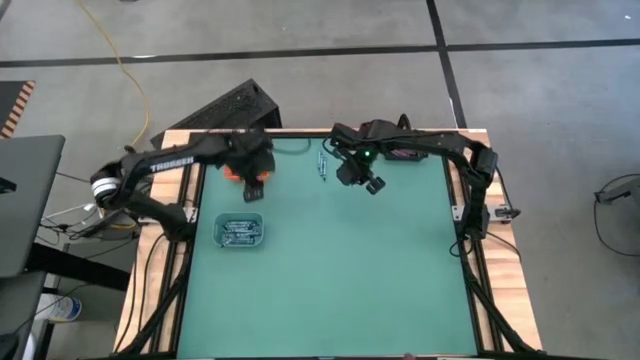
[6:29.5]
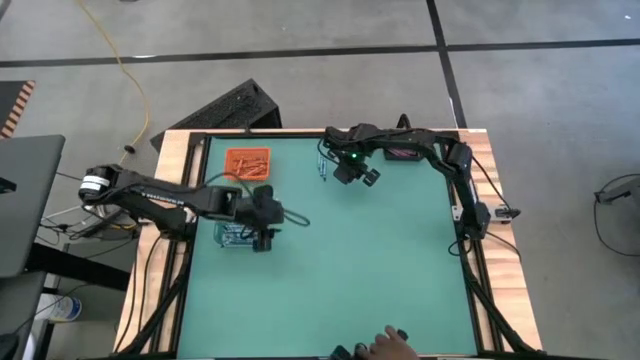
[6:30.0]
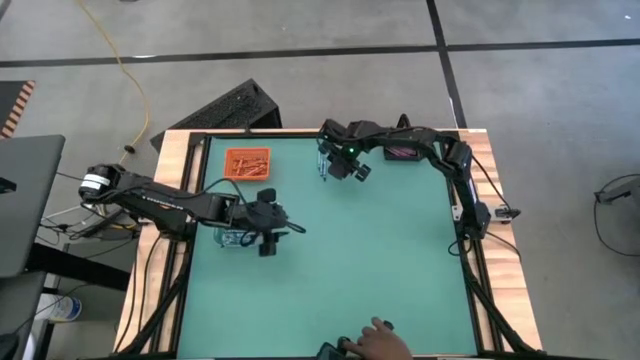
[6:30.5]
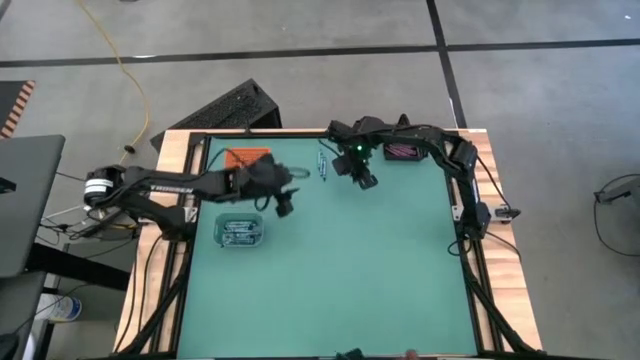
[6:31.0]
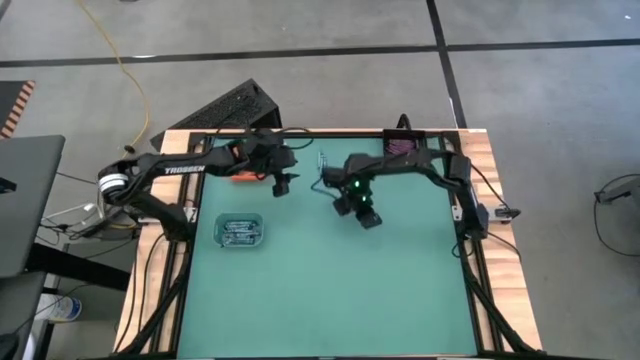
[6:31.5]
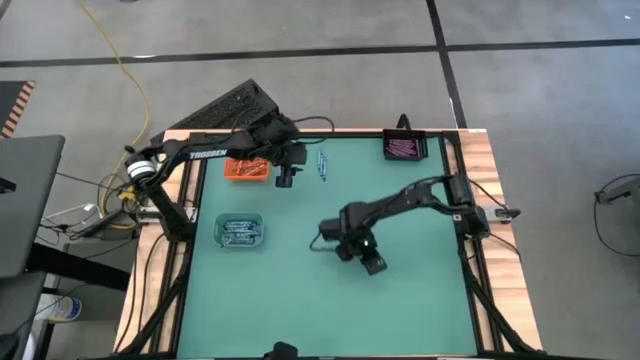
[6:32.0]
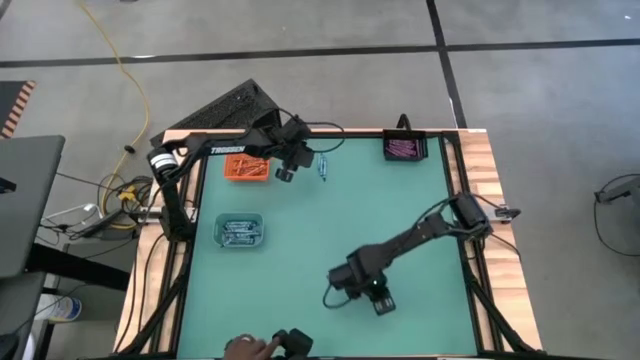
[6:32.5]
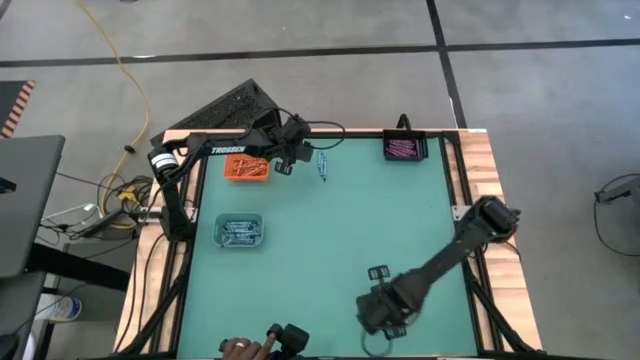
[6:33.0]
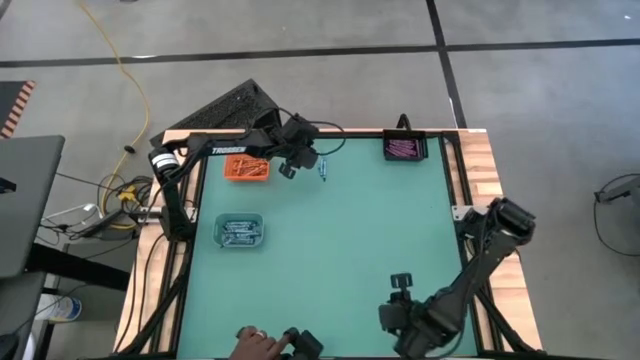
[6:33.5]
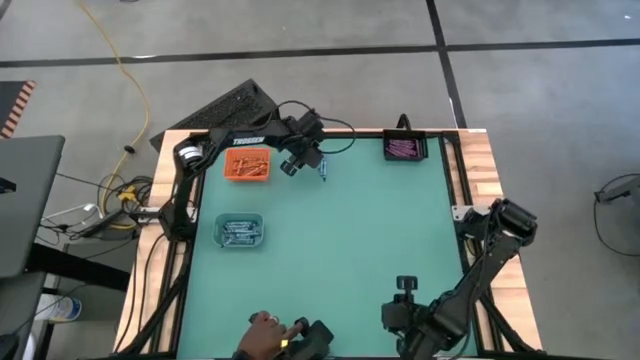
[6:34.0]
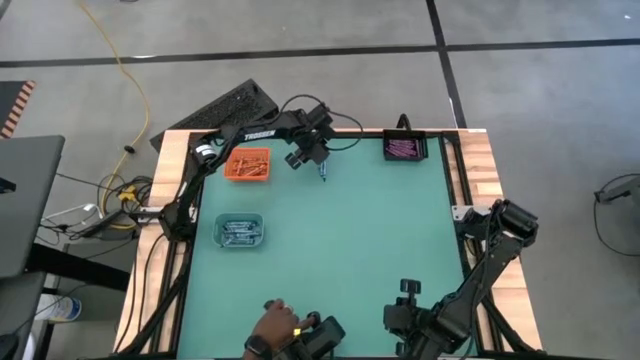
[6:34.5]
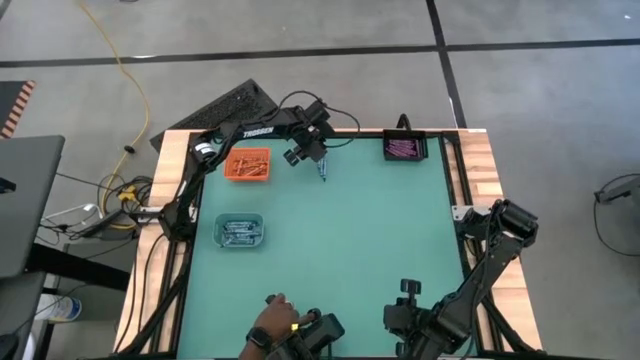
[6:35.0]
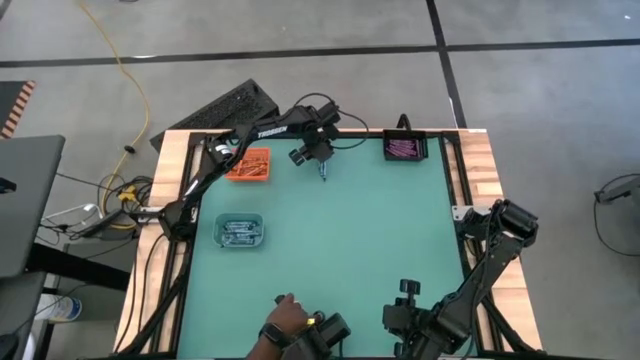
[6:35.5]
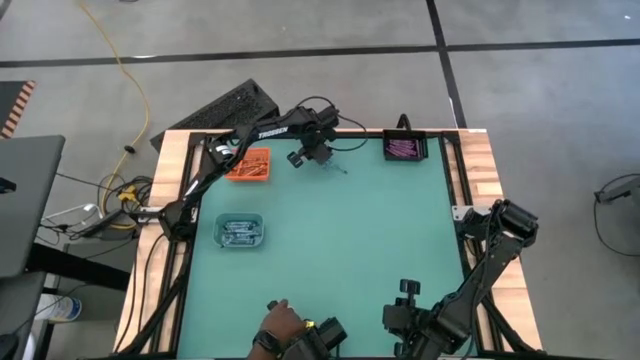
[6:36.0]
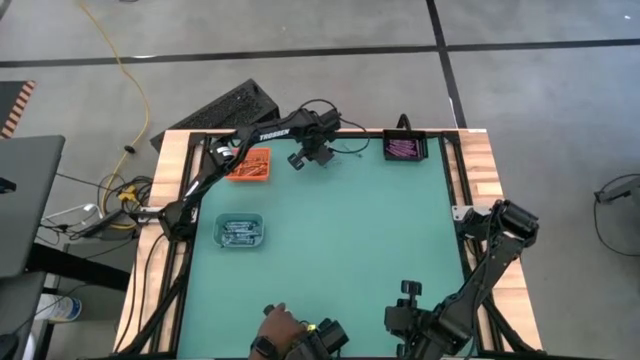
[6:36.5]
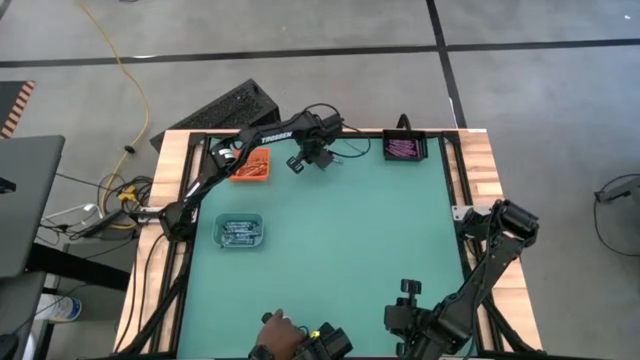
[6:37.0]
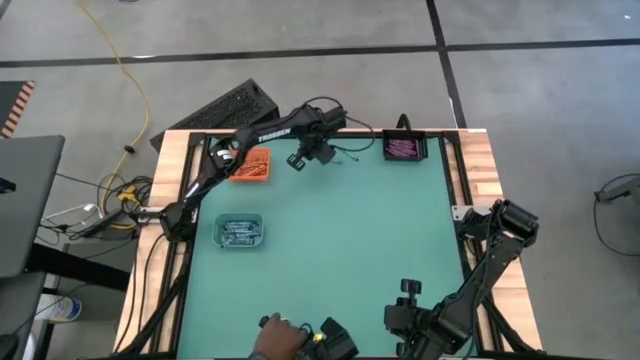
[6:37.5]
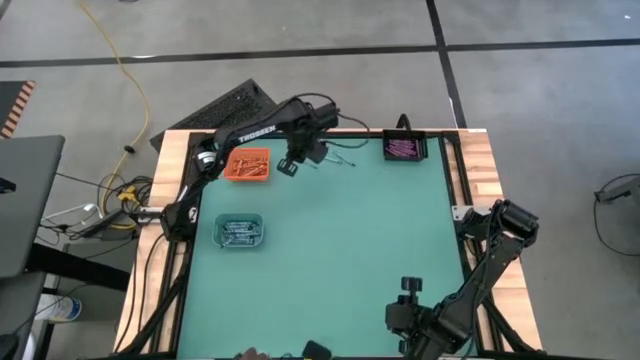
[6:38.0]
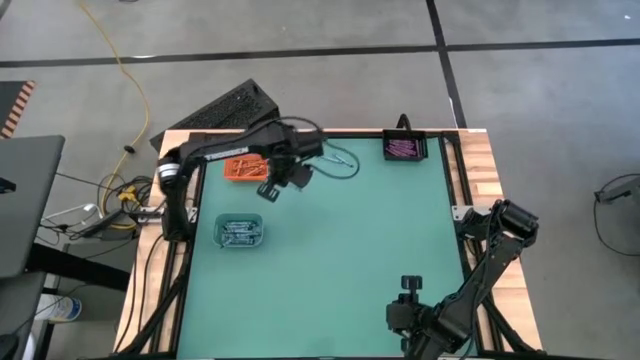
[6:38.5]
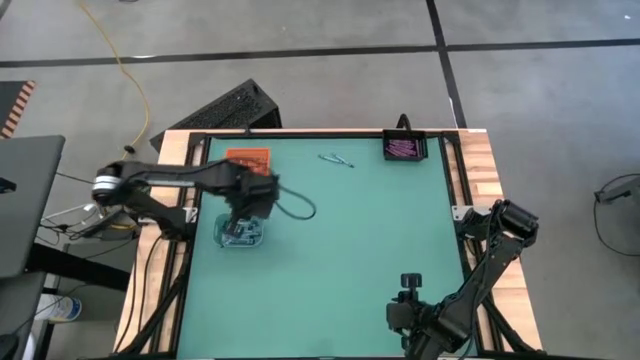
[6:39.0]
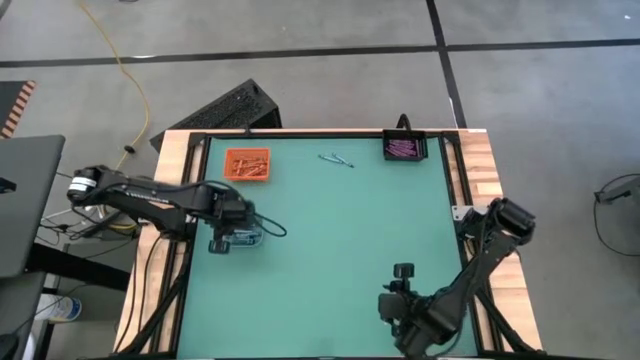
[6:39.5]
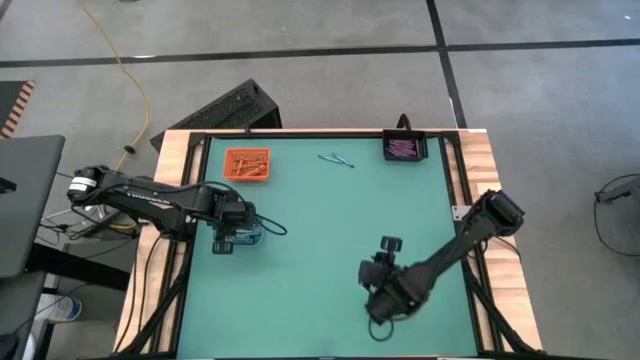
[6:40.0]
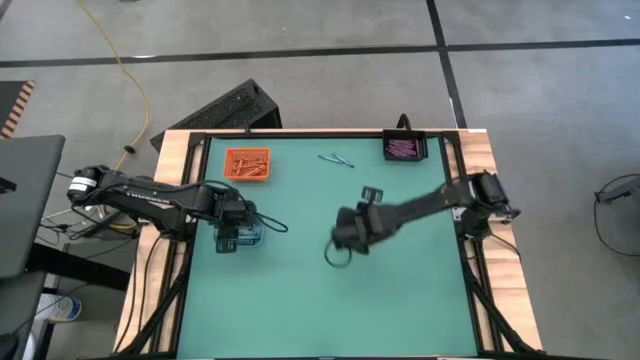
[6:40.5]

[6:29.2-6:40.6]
Task: Sort crayons
Put the blue crayon into the blue bin

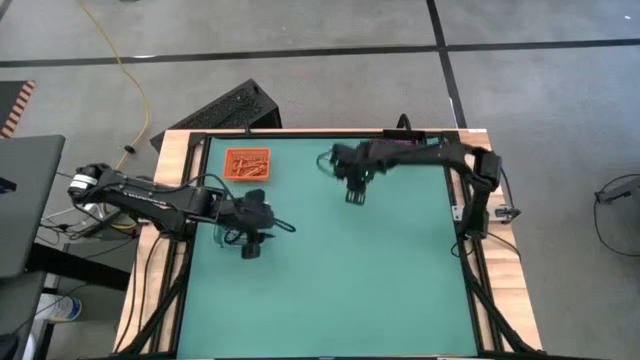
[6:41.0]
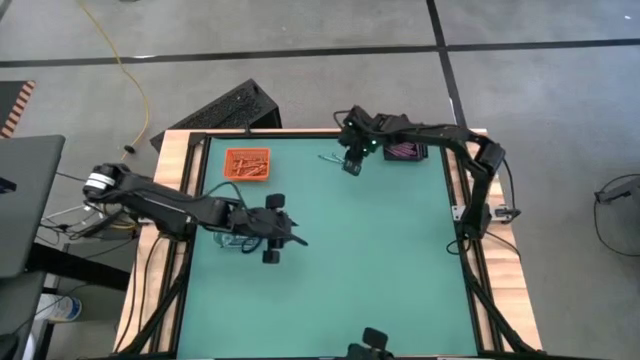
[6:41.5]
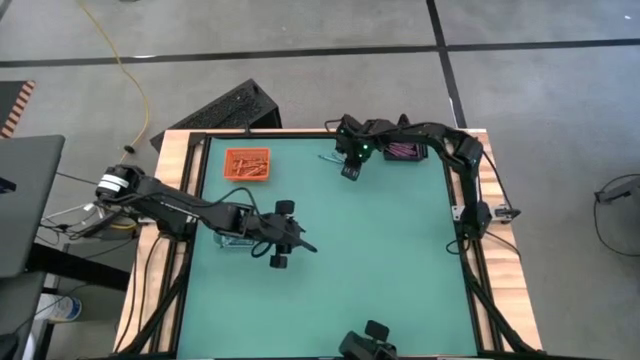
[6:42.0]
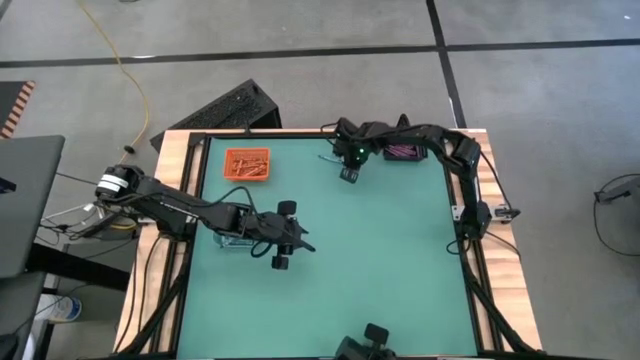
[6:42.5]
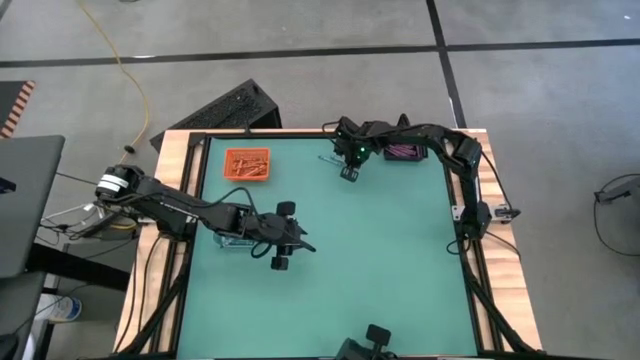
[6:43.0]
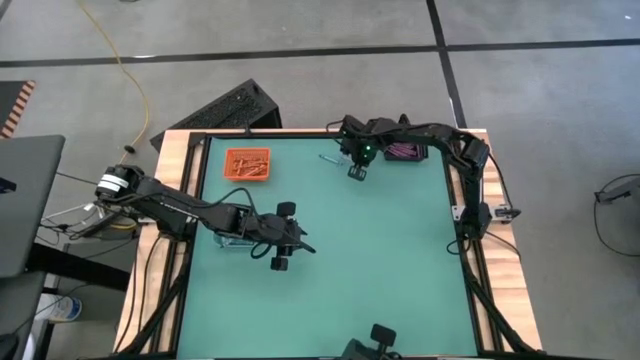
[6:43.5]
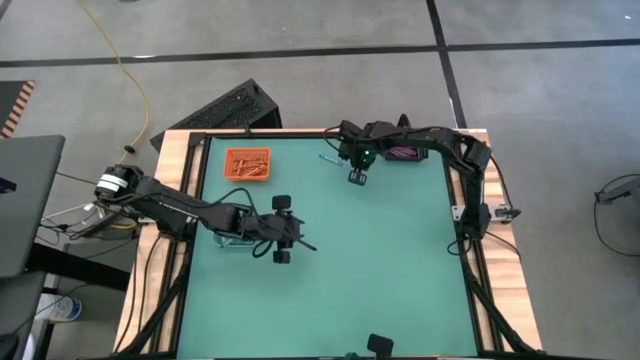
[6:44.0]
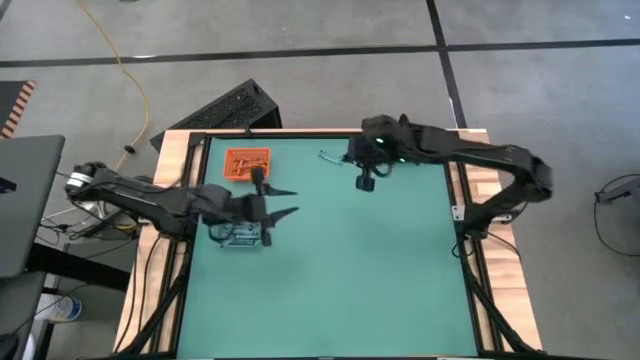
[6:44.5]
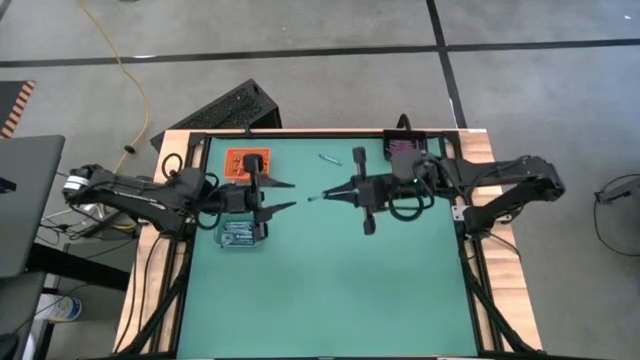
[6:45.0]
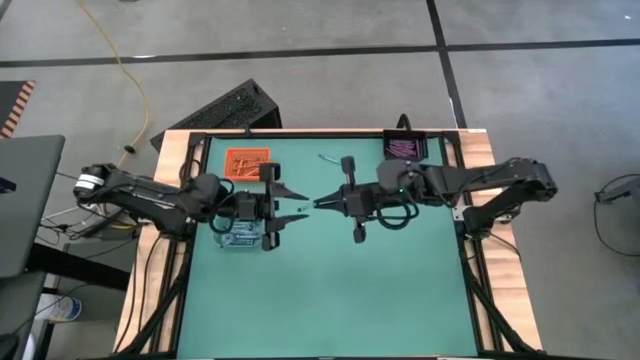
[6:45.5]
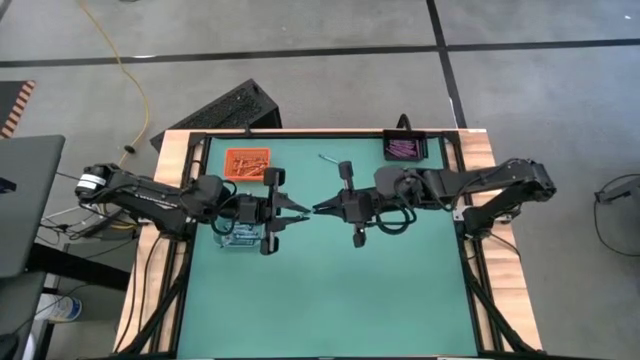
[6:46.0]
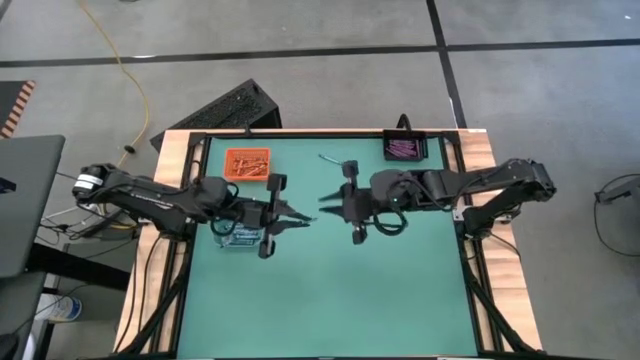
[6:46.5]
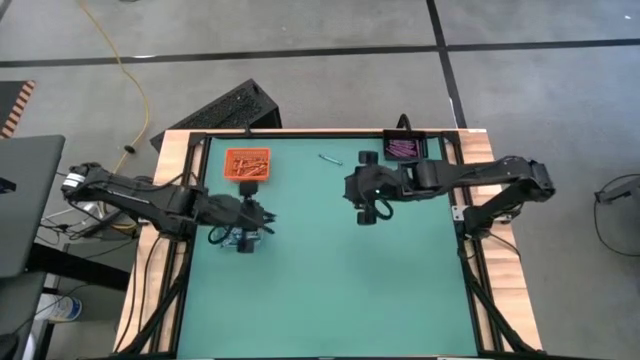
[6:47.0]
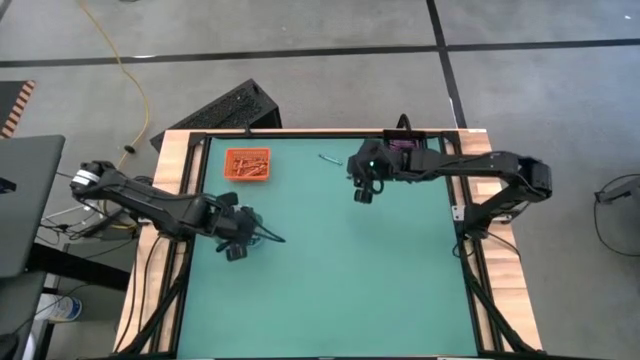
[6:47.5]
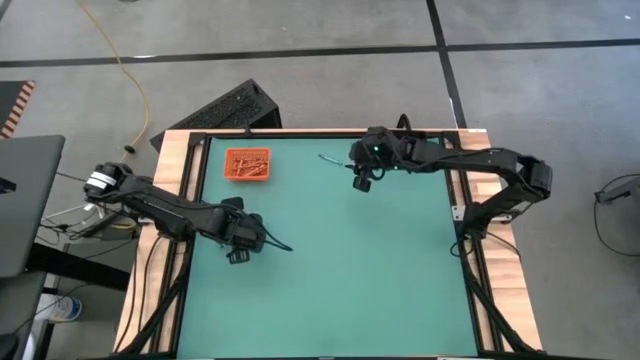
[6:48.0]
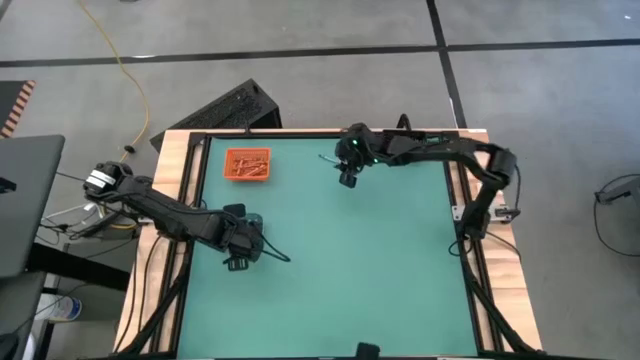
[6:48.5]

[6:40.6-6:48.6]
Put the blue crayon into the blue bin

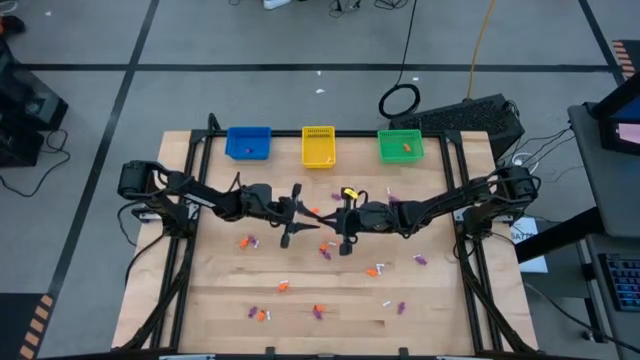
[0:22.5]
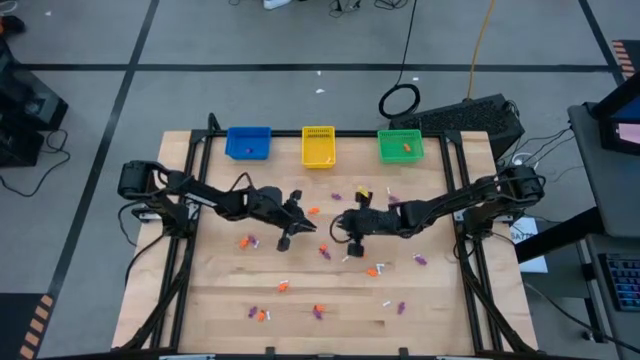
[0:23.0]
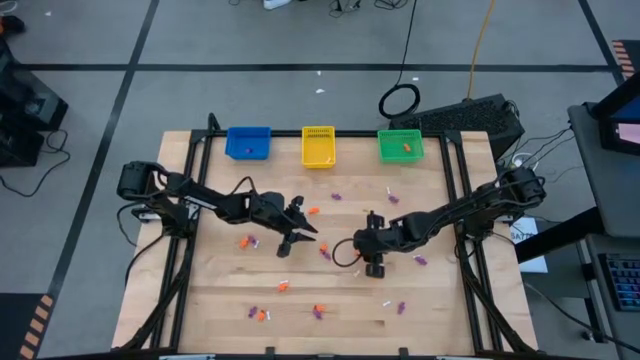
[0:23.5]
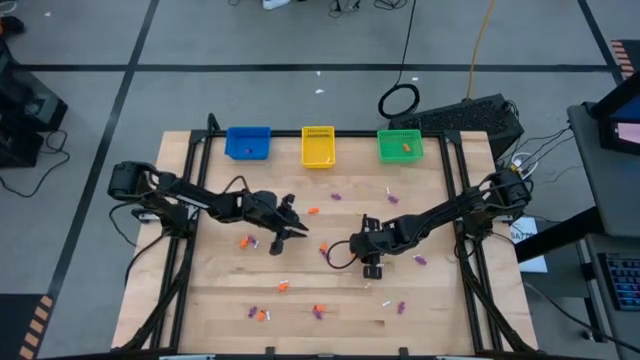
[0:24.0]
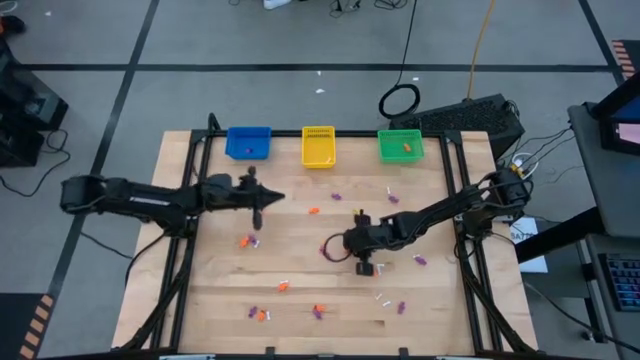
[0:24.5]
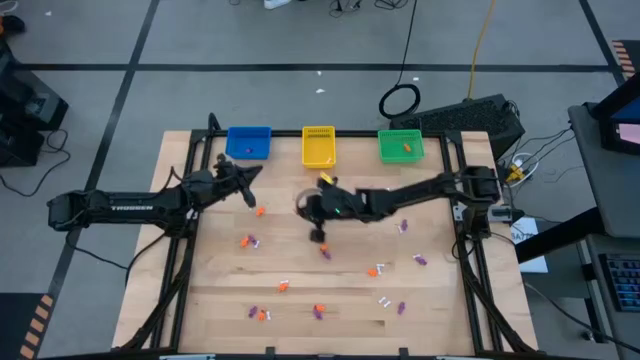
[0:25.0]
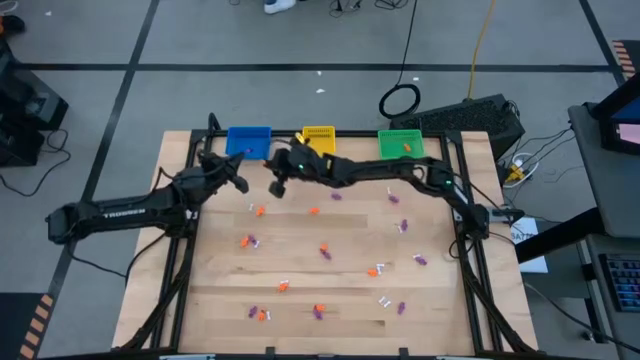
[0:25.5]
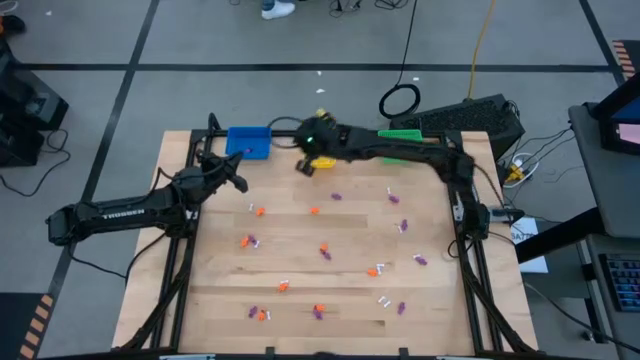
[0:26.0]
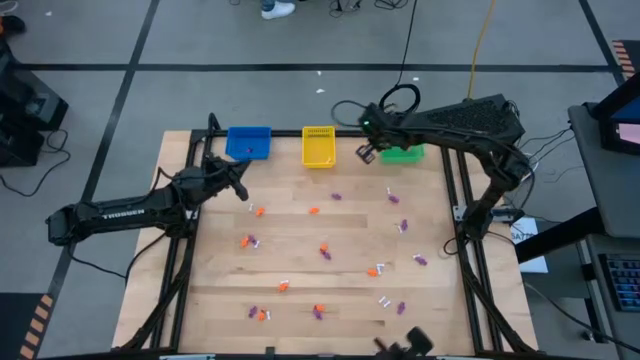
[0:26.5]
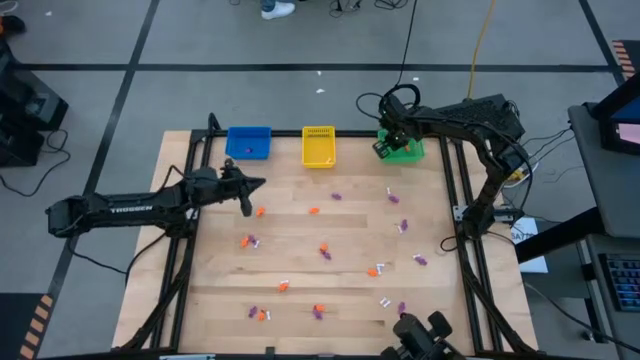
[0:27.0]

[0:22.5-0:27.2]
Task: Sort Halloween decoration
Put the orange skeleton toy into the green bin
